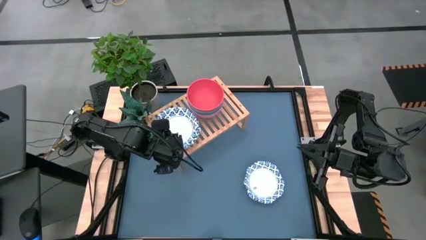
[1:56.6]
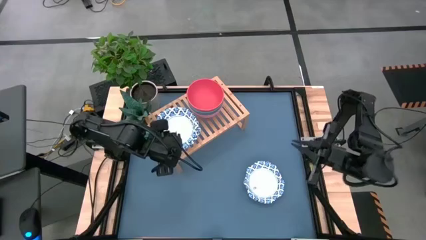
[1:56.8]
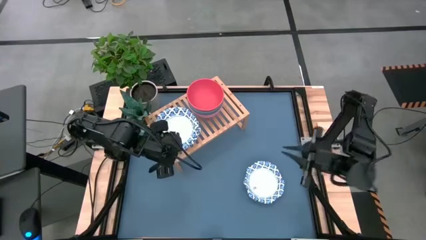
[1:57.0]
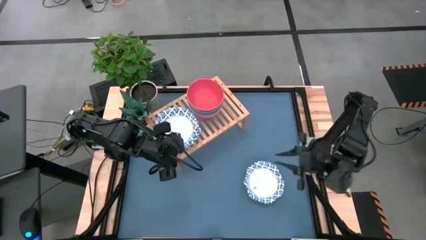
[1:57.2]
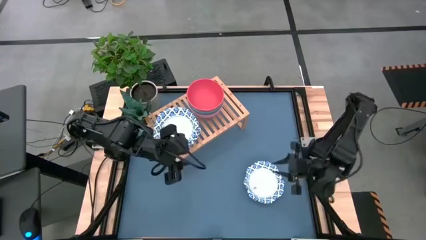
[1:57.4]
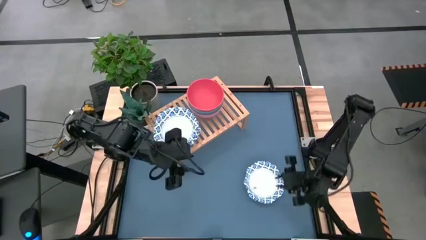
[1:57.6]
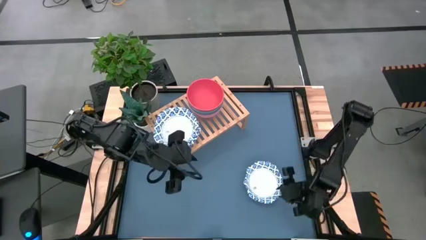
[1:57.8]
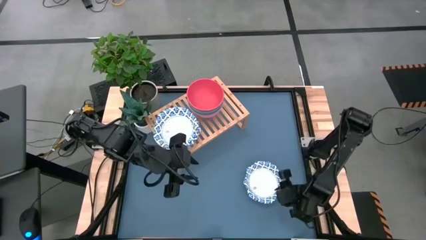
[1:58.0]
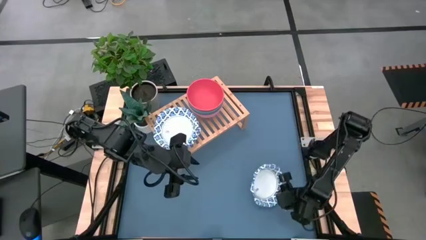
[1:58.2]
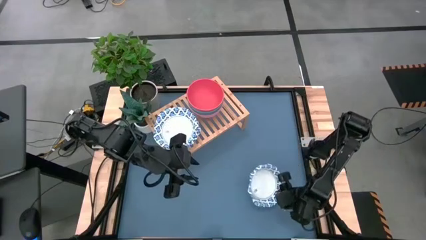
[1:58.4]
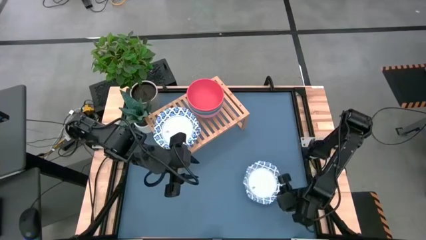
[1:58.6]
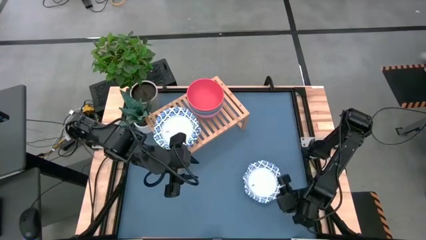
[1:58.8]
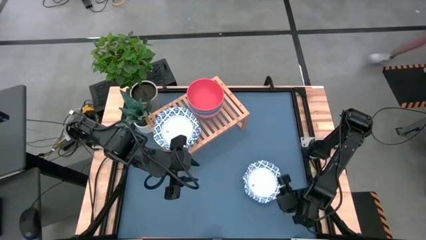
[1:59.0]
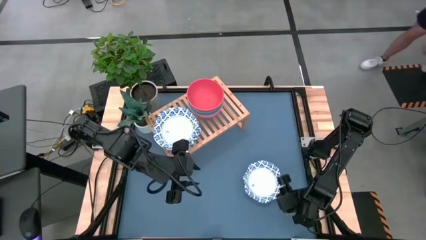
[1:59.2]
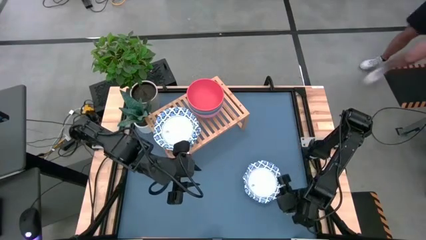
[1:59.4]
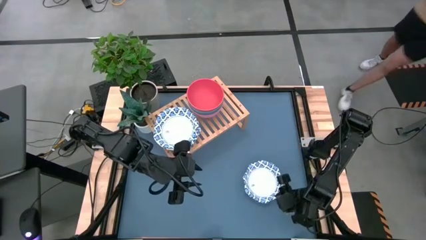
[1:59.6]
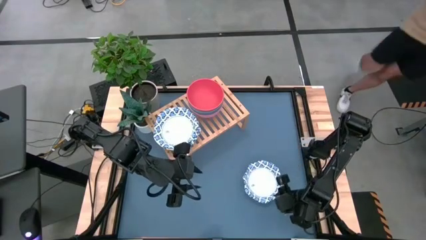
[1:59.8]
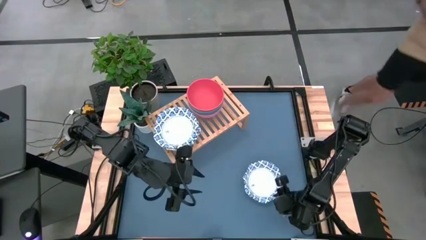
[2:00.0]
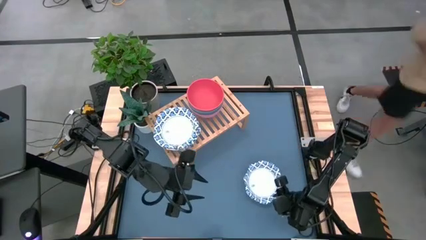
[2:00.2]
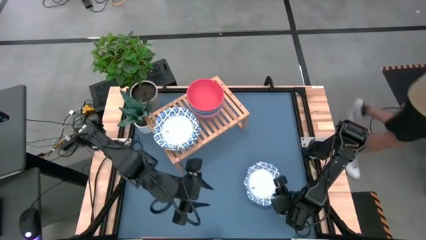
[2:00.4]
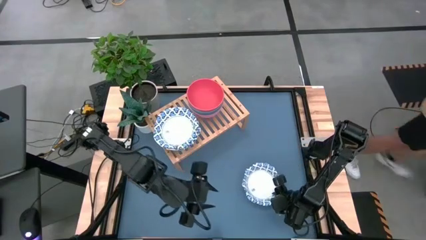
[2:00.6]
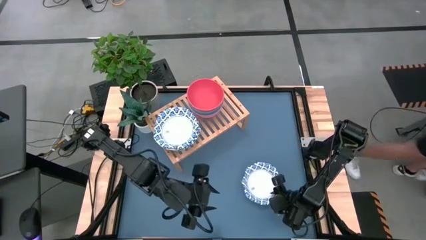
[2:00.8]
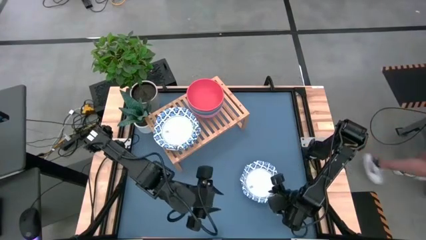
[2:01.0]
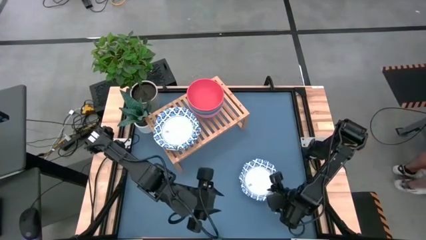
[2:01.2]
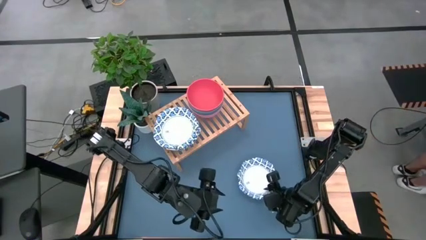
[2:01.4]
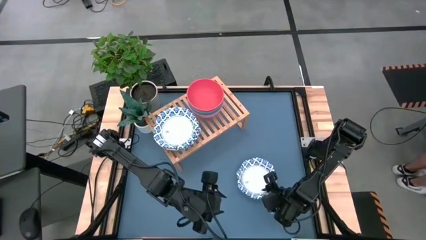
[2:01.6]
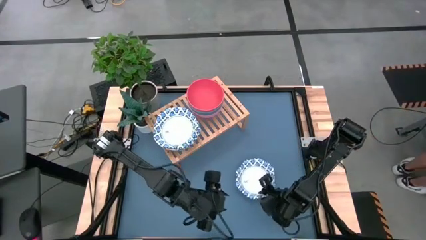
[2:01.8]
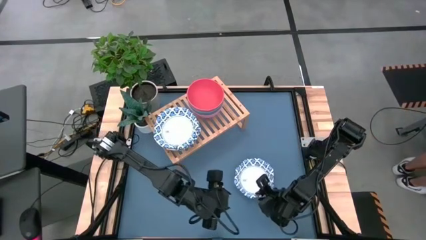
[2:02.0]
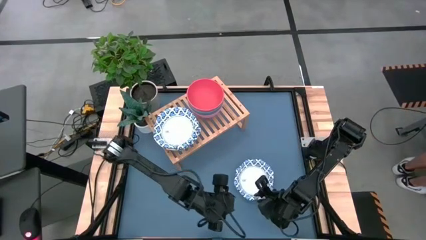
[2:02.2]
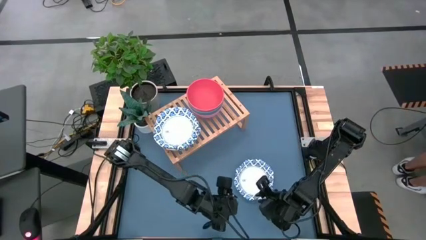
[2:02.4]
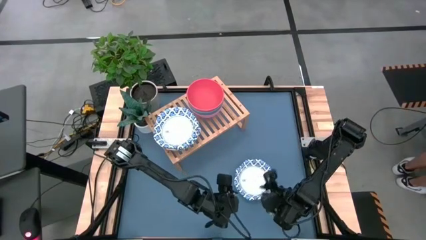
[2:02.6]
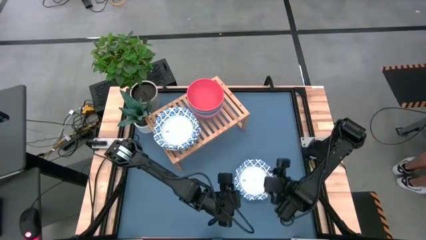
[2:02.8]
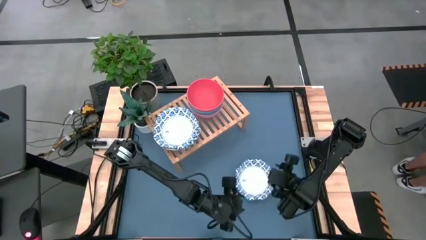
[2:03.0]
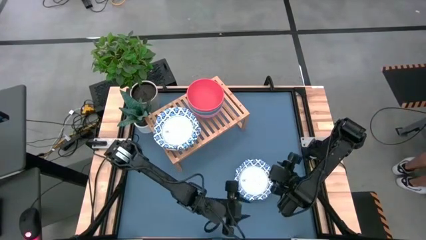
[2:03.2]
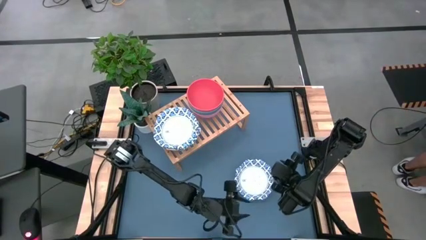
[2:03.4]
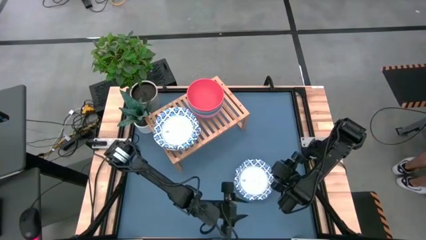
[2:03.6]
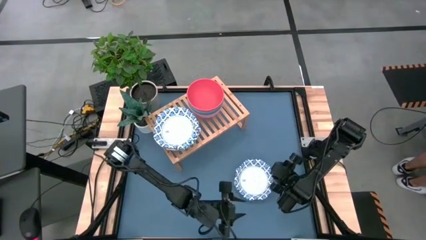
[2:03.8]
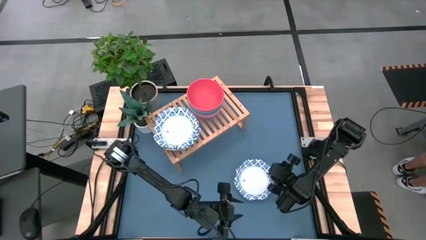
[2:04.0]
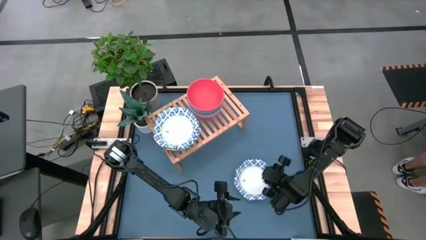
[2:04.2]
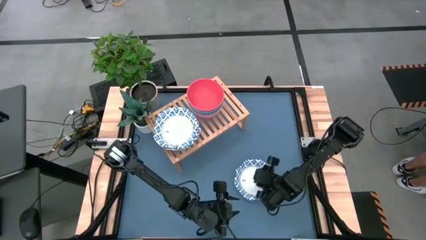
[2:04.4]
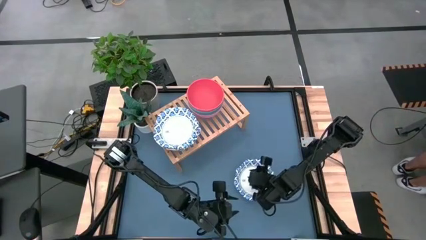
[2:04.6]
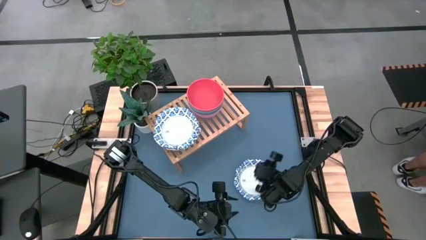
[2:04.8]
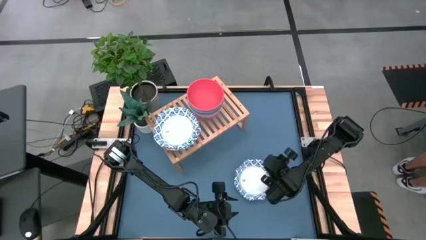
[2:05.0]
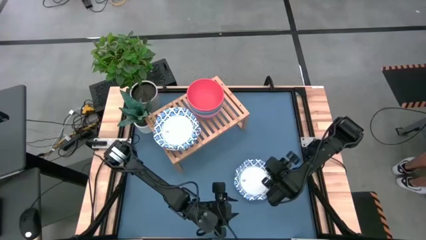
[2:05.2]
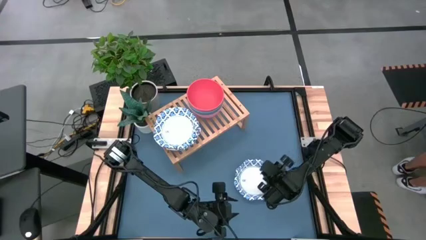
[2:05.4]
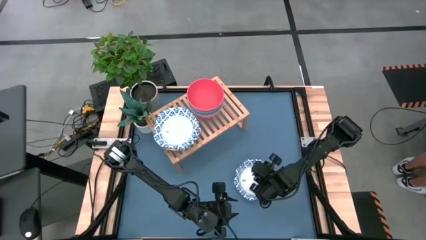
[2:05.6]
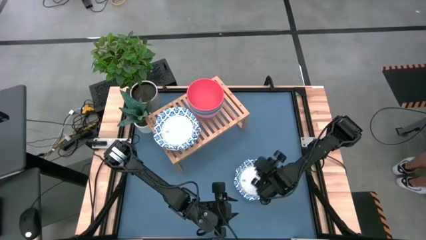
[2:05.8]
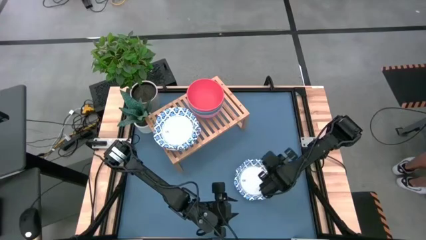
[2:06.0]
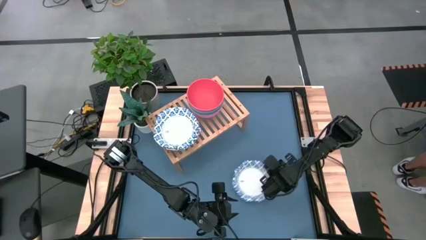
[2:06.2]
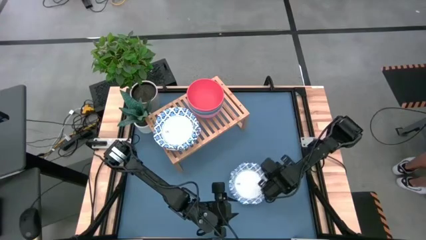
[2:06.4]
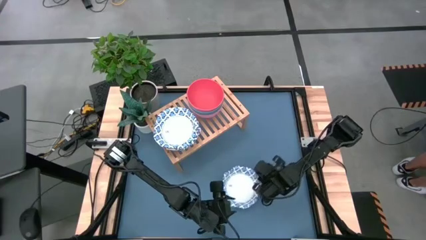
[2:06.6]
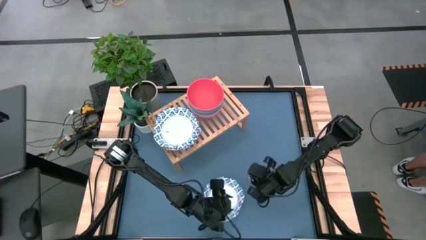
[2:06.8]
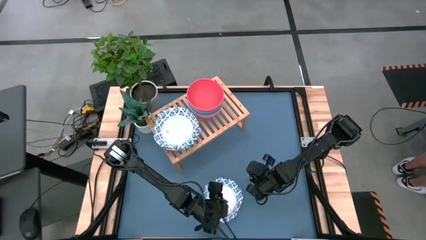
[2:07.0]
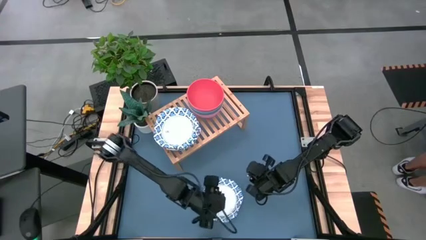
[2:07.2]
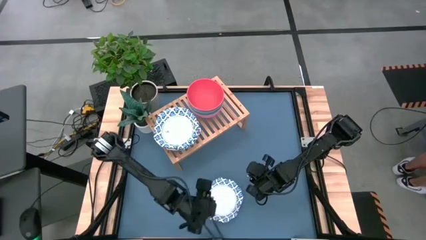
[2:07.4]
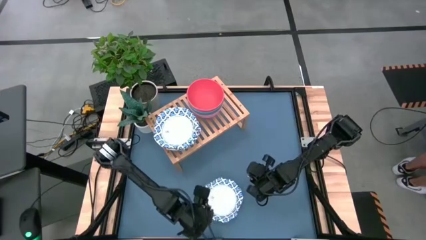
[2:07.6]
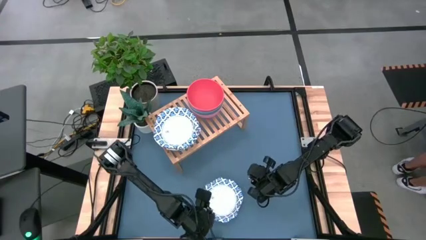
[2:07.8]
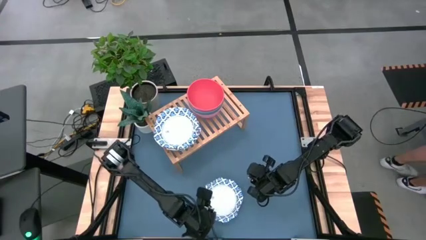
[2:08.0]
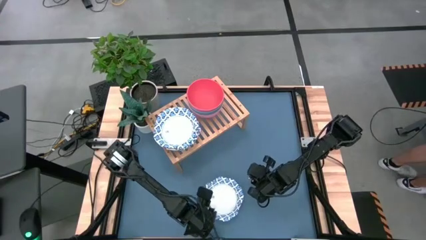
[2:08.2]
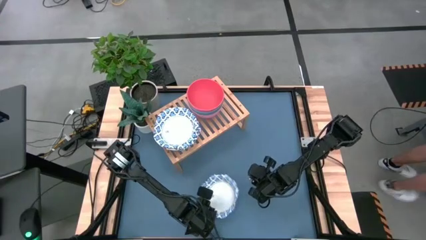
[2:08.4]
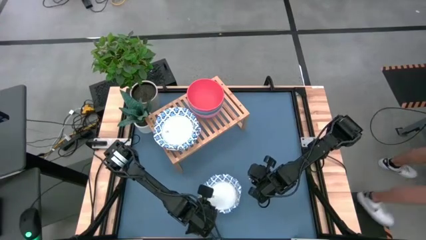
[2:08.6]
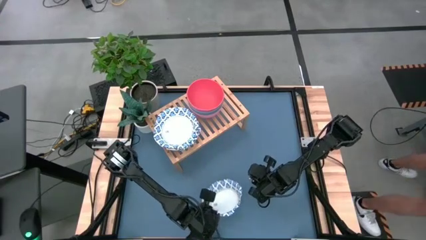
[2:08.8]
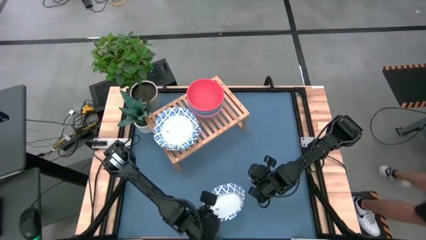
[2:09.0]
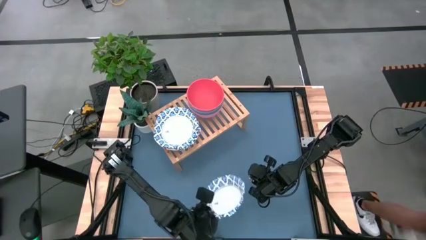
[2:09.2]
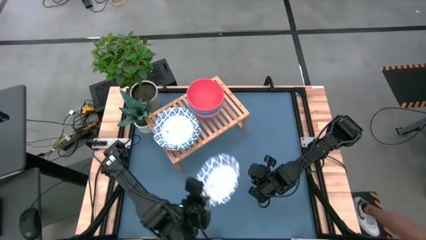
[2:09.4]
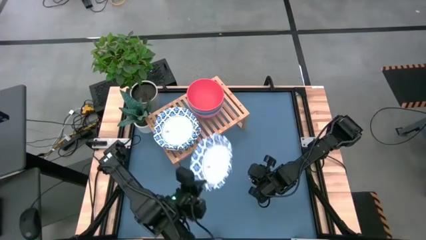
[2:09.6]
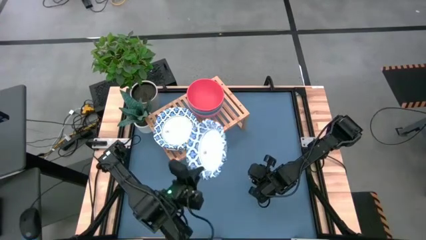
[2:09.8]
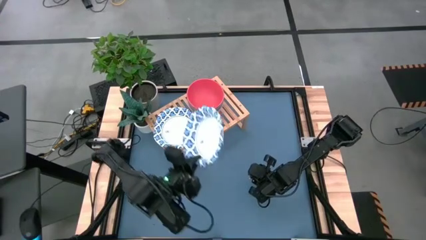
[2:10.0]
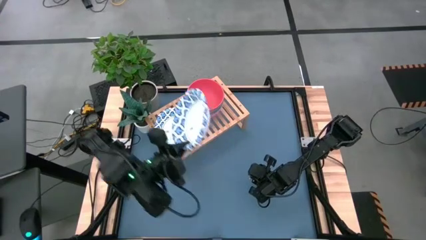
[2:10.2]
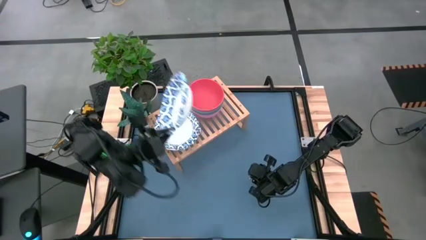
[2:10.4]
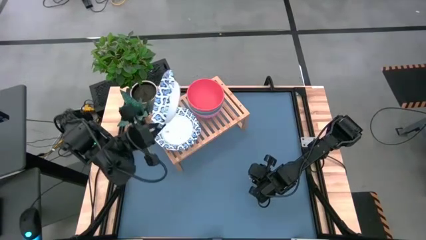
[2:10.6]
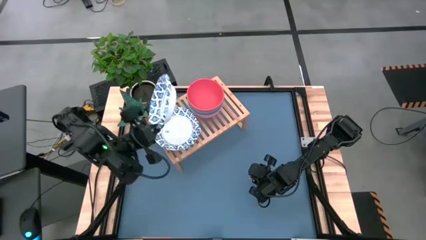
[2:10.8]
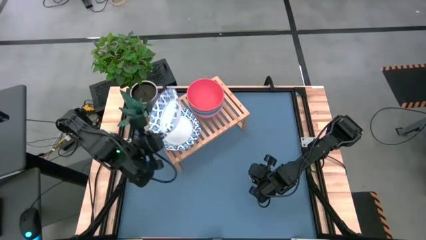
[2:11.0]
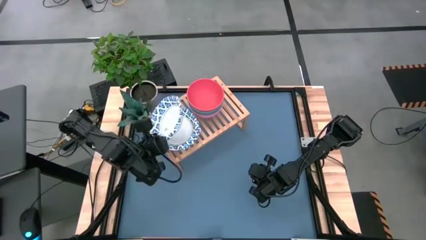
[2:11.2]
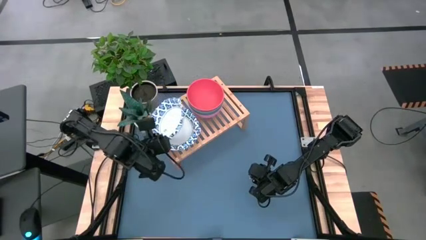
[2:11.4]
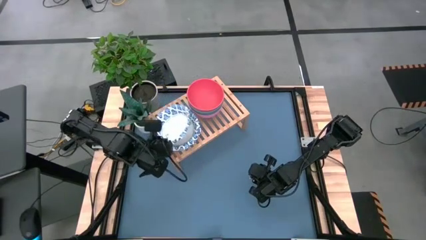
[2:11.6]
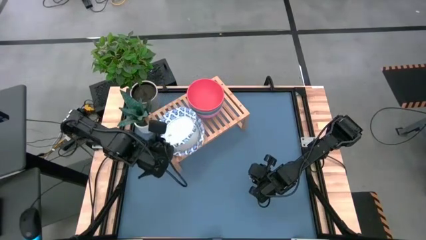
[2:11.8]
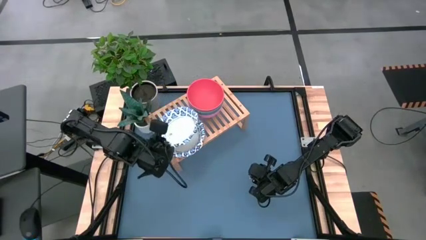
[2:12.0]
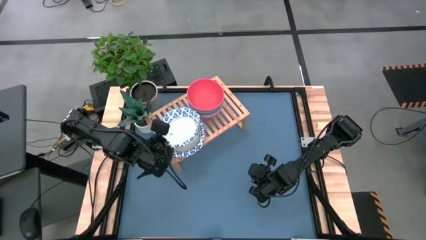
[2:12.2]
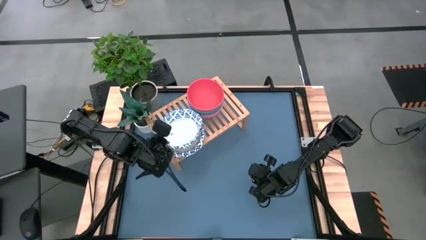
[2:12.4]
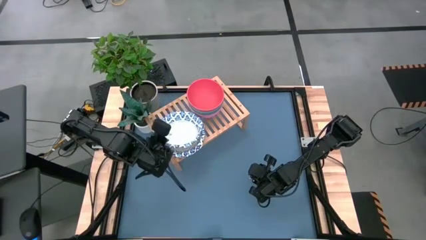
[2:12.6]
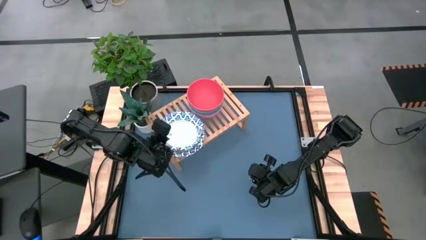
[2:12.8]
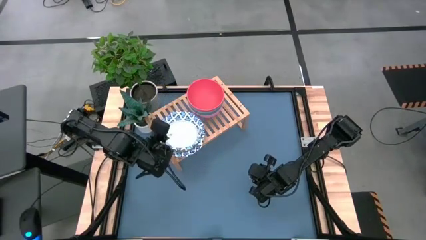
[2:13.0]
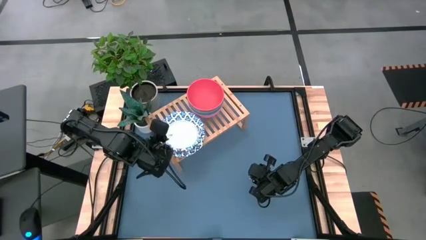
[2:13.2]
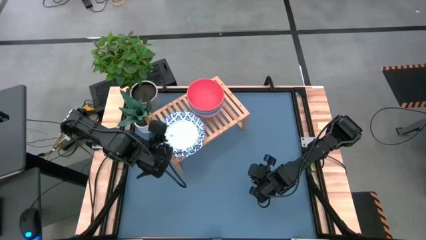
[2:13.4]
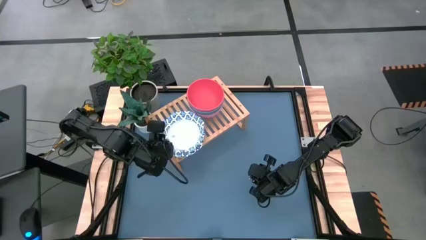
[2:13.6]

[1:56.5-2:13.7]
Task: Place and stack bowls onto a shelf
Stack the white patterned bowl on top of the other white patterned bowls on the shelf
